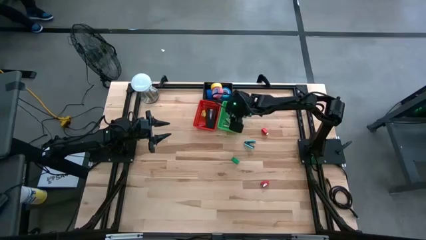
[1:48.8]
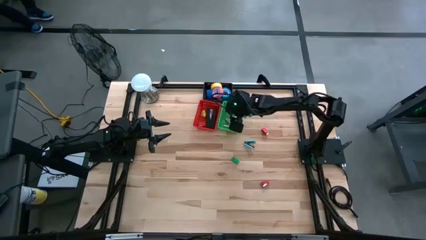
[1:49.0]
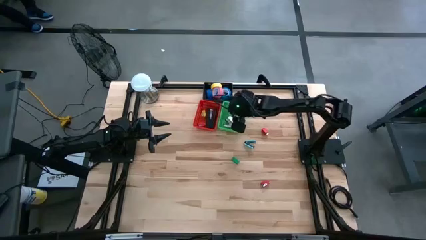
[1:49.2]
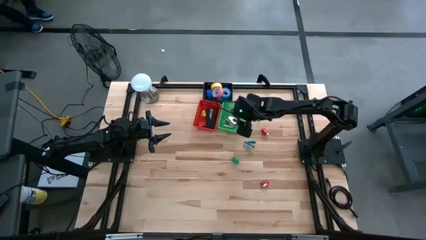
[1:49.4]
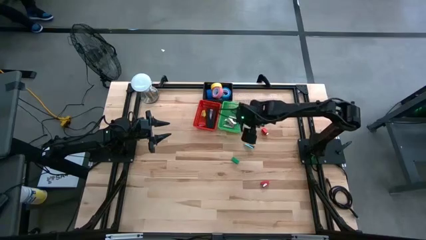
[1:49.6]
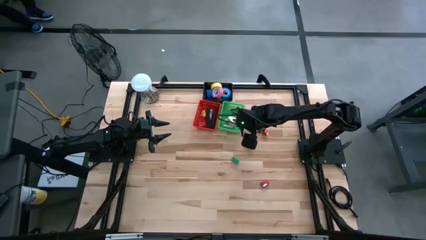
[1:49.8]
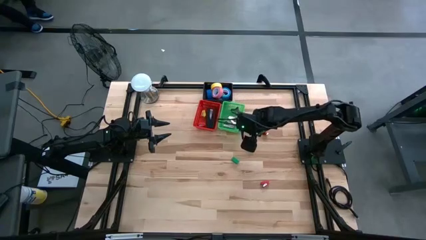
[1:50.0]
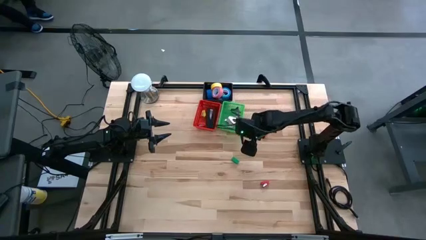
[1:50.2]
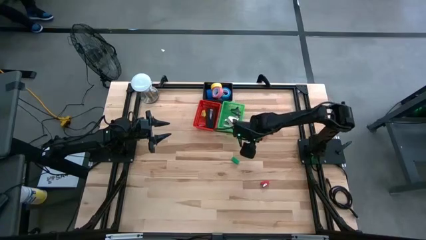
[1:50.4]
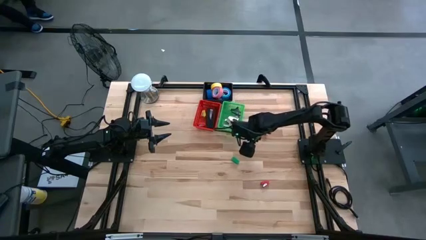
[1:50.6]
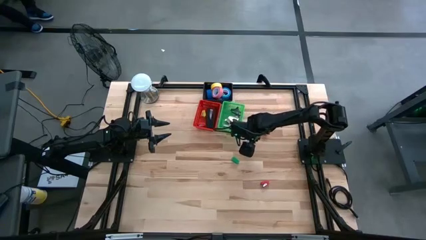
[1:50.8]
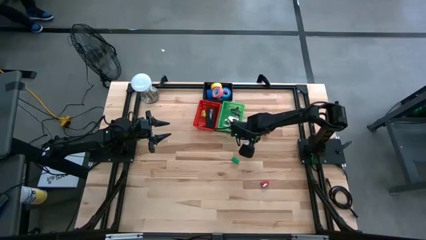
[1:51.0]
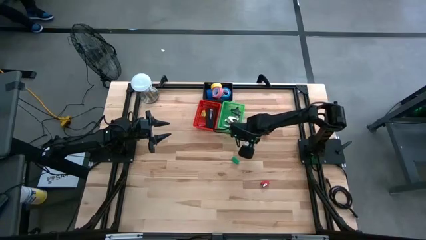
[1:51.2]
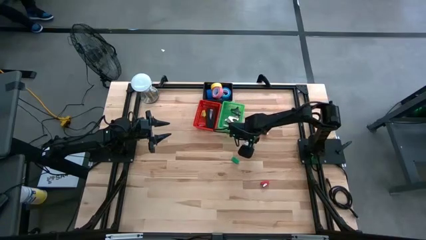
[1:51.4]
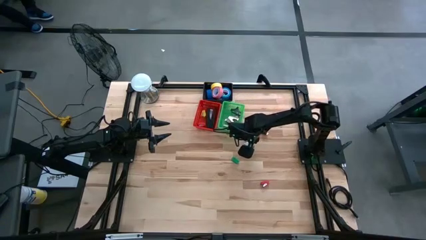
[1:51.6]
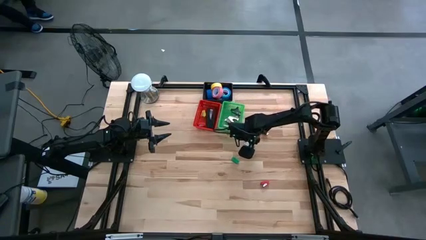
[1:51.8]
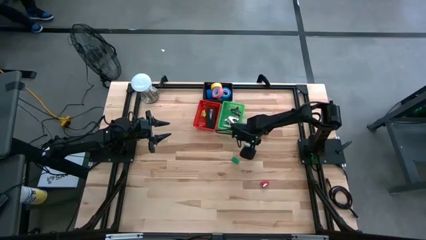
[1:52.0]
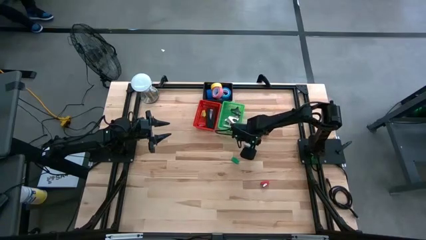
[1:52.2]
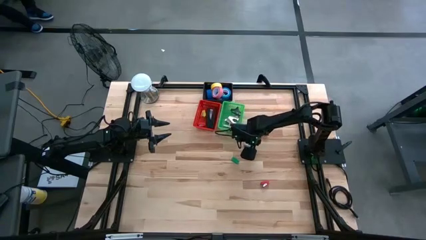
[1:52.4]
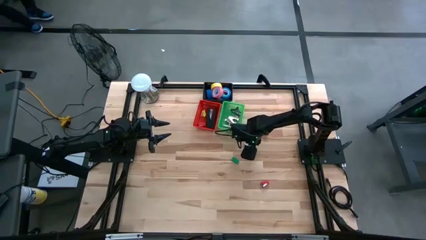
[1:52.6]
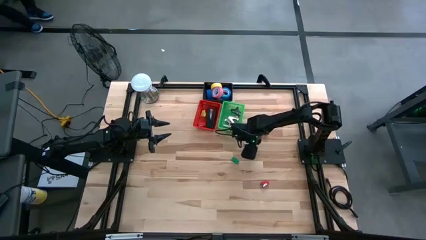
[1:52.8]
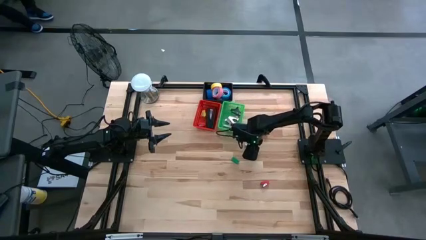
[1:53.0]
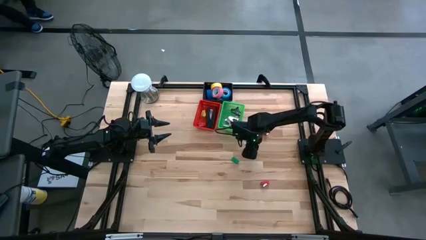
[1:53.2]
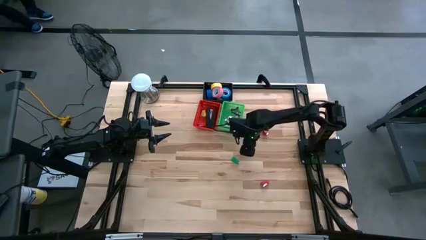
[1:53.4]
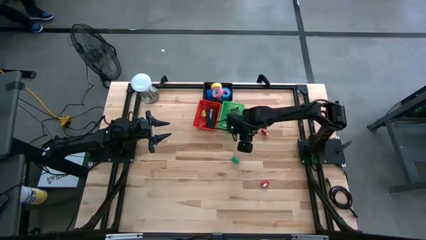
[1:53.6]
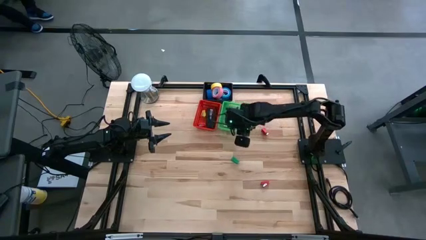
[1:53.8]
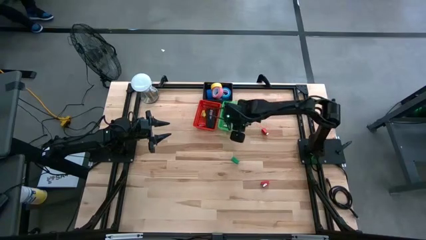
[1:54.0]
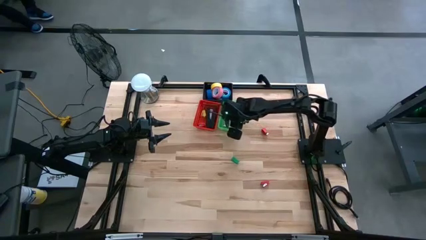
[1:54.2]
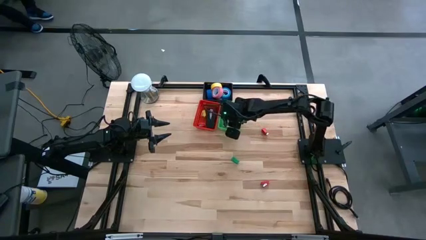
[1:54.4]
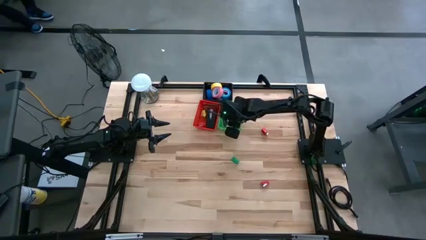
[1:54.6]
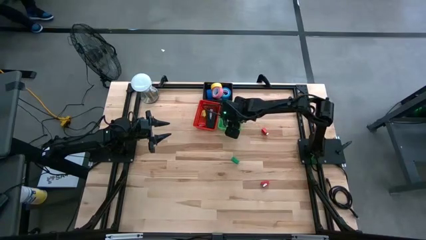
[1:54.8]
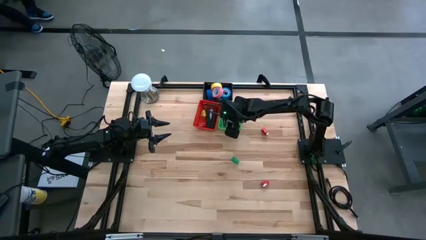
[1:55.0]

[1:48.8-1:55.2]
Task: Pick and place Stapler, Stapler remover, tape
Put the light blue staple remover into the green bin

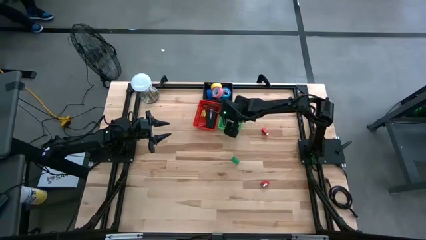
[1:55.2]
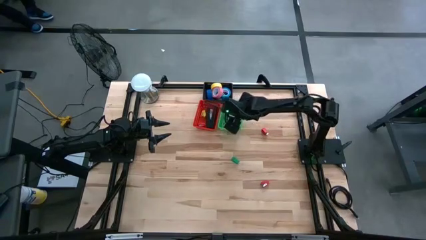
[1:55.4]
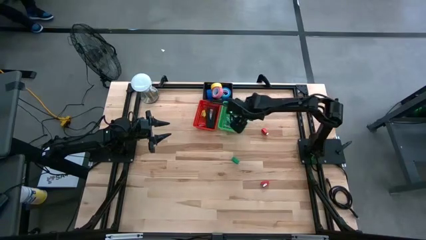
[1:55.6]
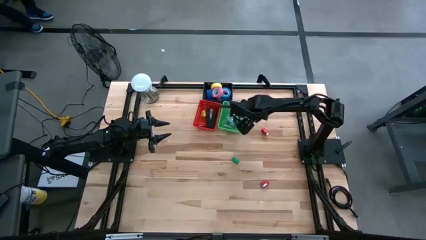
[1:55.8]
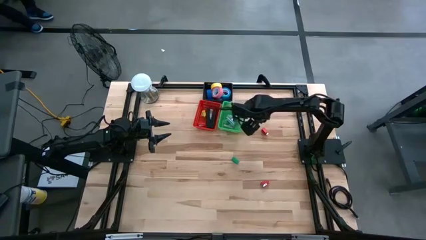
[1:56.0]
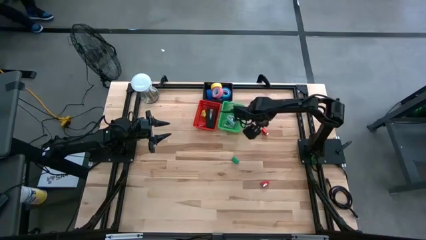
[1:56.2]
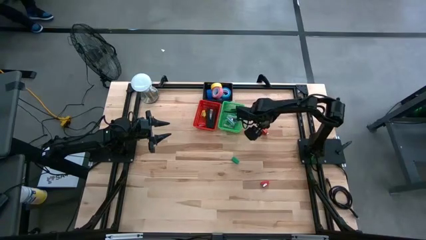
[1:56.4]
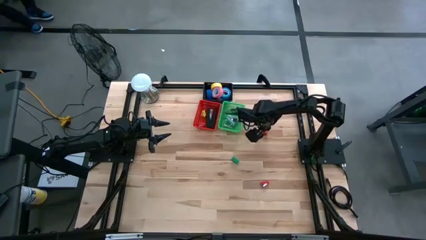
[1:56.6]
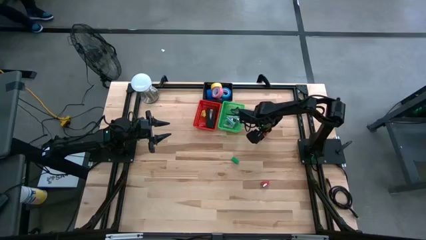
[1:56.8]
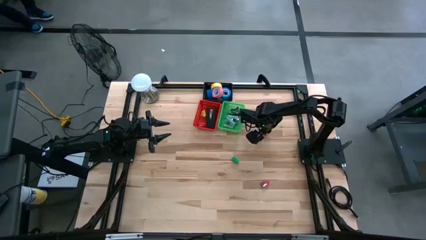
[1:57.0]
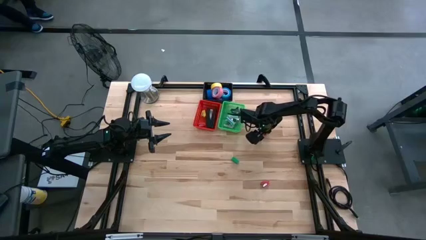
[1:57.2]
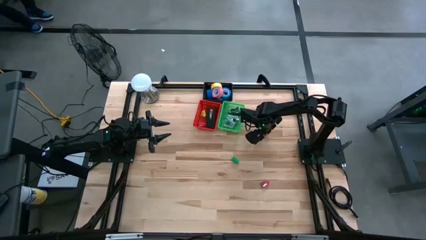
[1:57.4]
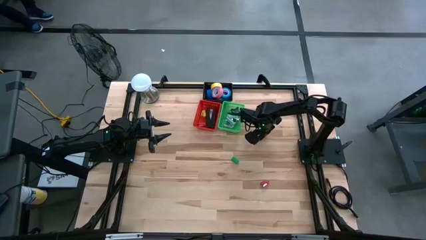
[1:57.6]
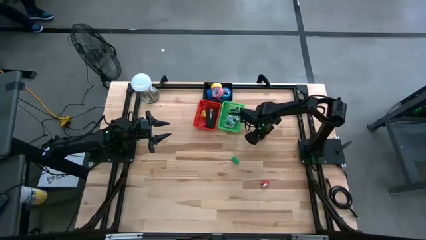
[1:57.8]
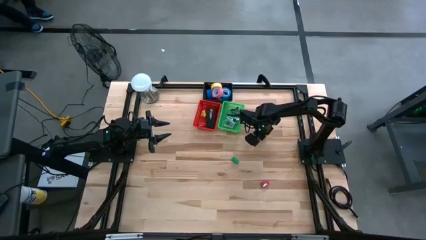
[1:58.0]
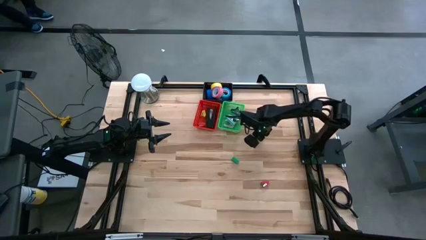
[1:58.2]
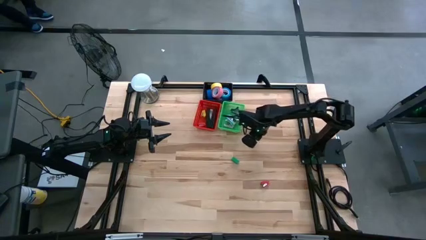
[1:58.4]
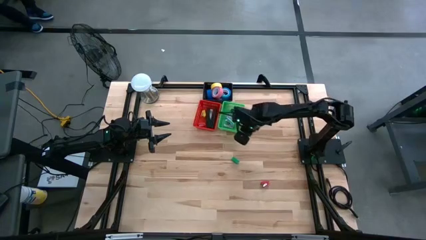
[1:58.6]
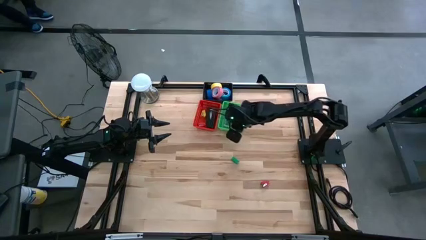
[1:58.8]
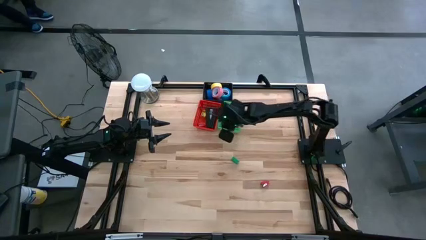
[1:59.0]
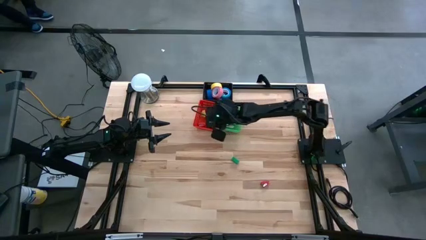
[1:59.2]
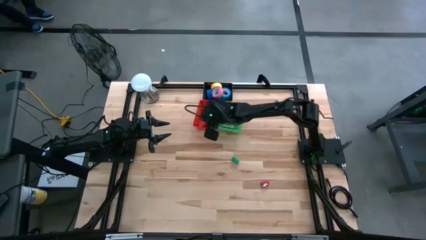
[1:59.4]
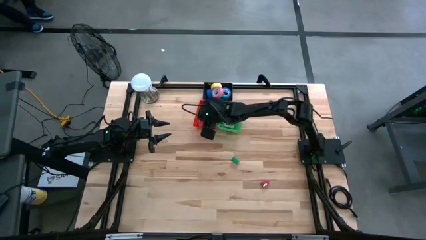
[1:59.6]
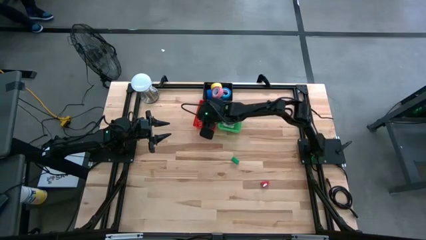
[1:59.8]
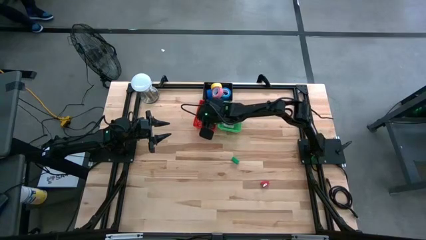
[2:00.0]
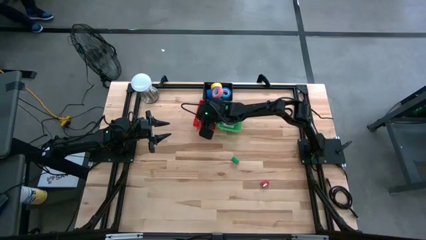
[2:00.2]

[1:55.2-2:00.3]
Put the top small red stapler into the red bin

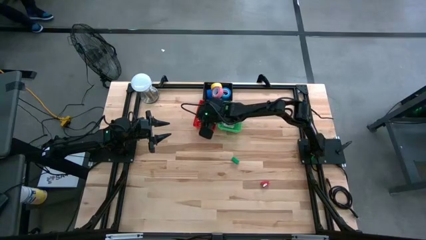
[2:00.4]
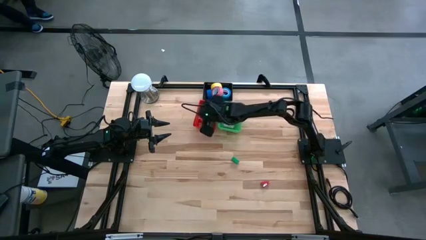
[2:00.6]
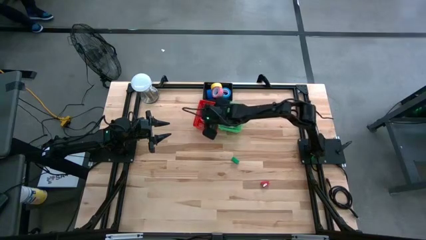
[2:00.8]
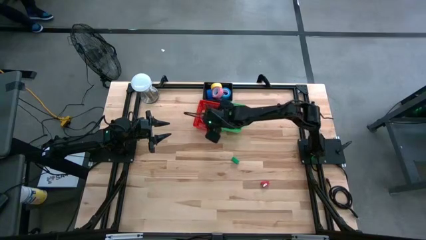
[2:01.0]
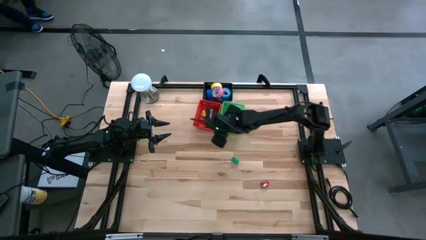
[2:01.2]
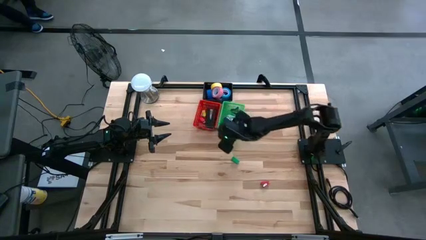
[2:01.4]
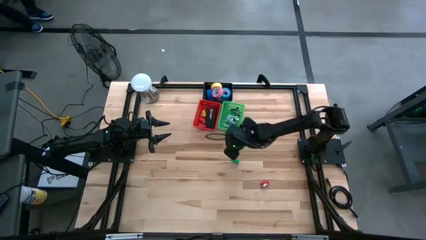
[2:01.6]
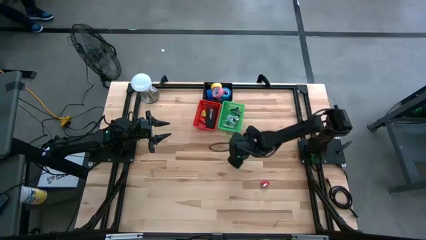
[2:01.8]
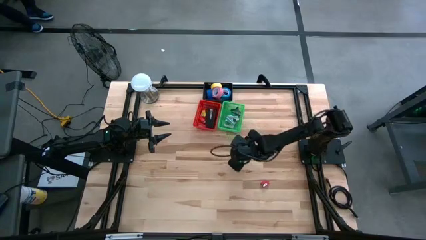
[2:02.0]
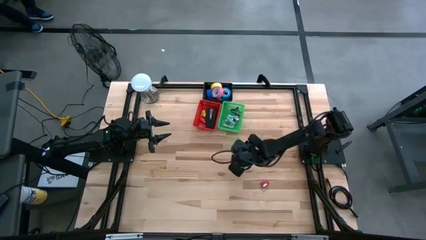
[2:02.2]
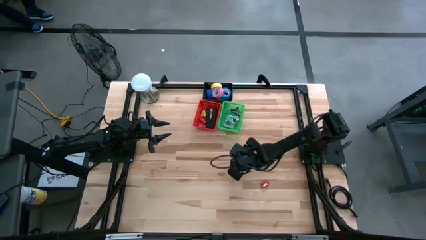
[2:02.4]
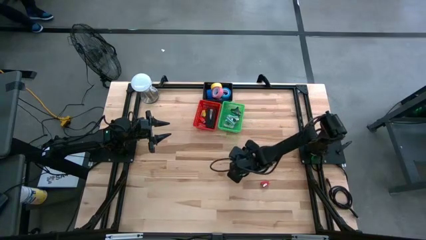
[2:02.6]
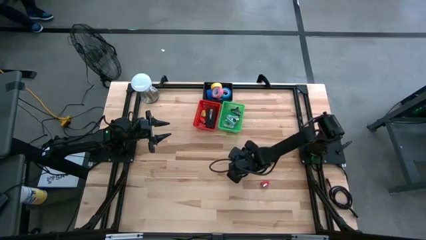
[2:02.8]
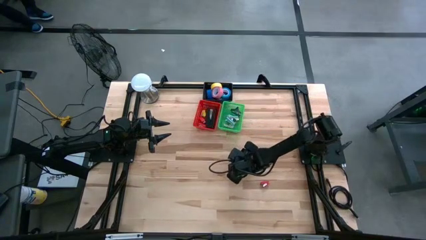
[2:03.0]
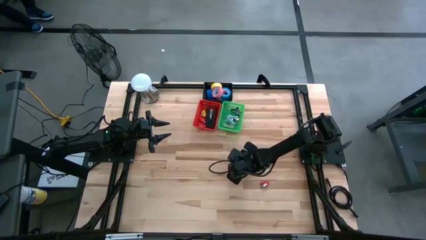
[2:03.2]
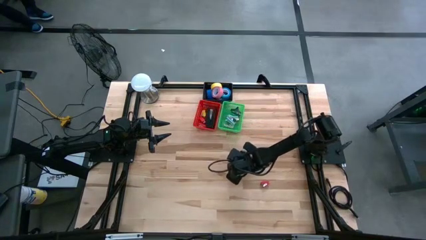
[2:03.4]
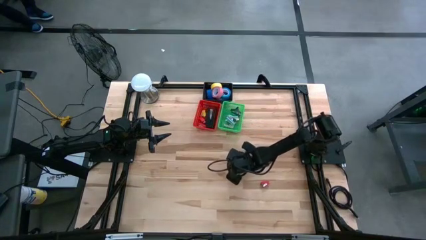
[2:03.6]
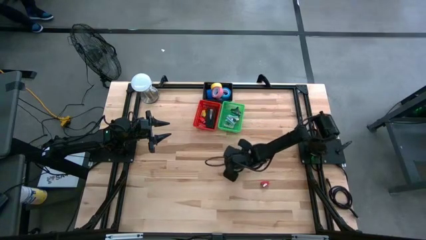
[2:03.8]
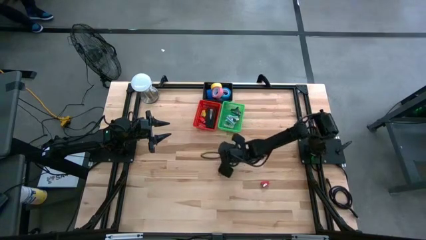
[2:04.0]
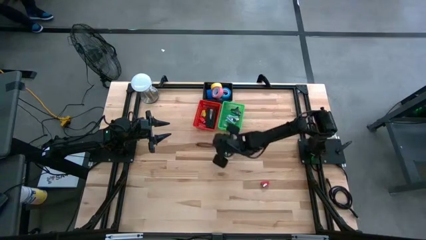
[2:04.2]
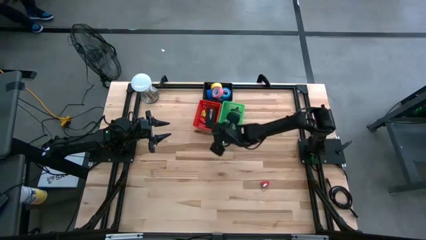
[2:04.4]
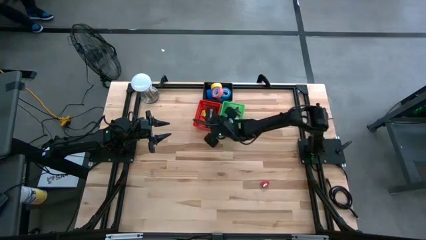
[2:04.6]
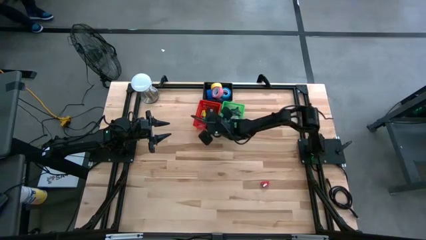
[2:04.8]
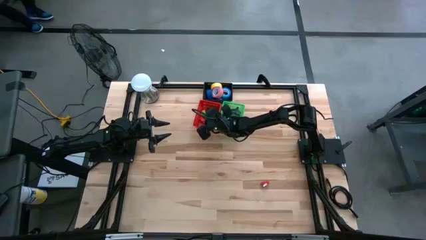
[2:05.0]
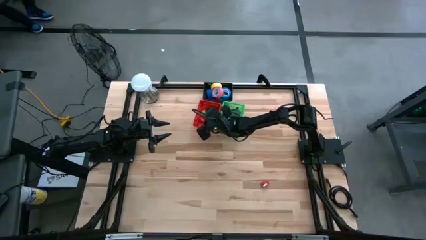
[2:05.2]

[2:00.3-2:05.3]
Put the small green stapler into the red bin
